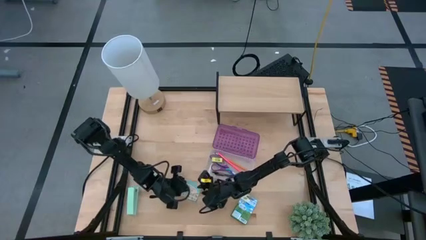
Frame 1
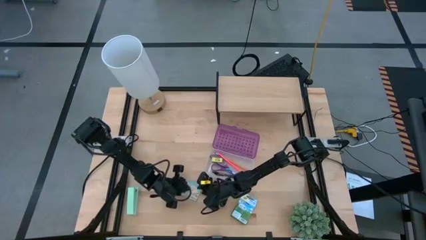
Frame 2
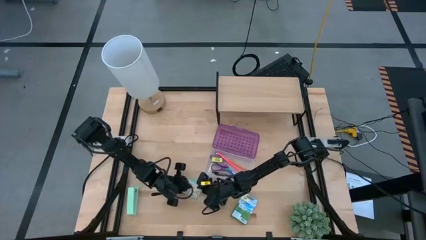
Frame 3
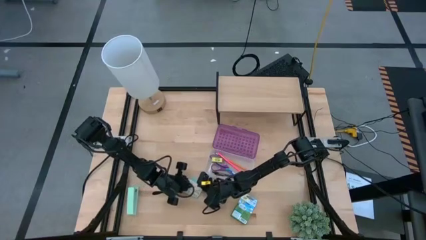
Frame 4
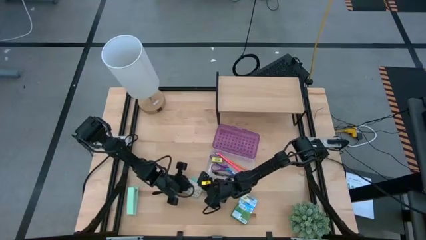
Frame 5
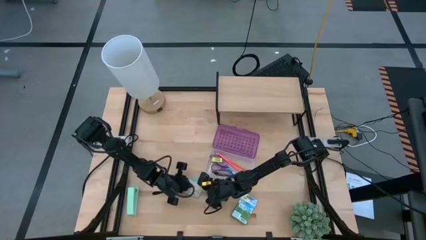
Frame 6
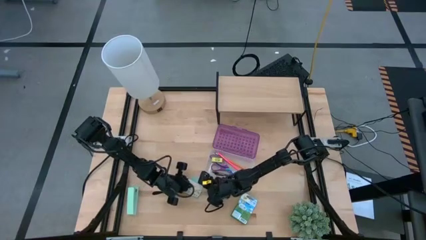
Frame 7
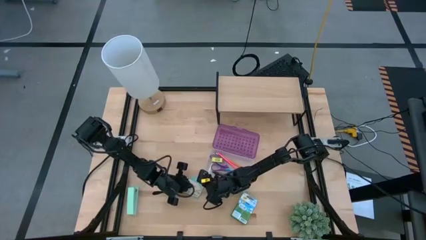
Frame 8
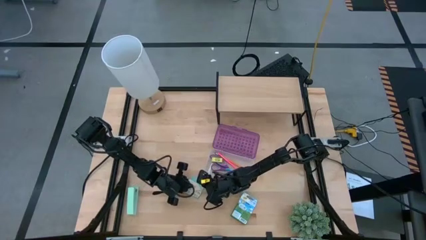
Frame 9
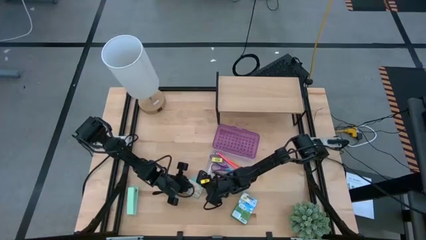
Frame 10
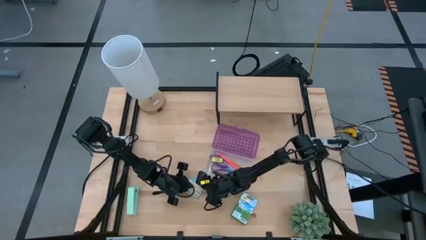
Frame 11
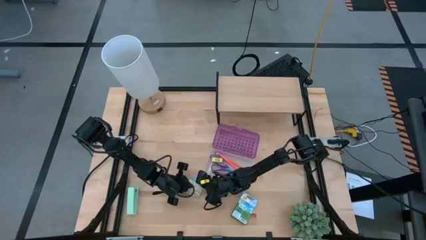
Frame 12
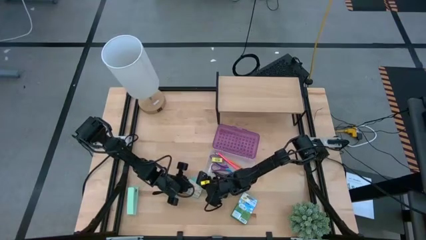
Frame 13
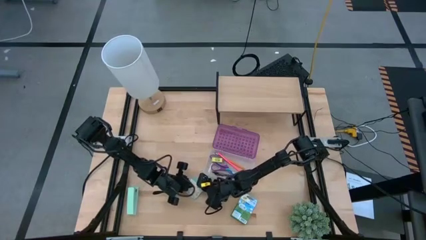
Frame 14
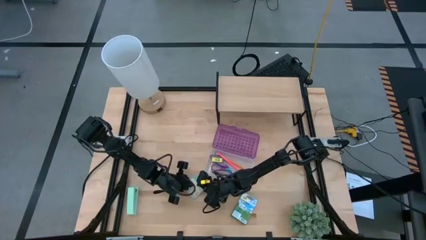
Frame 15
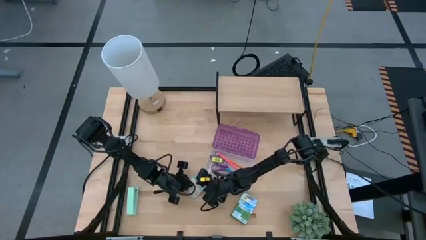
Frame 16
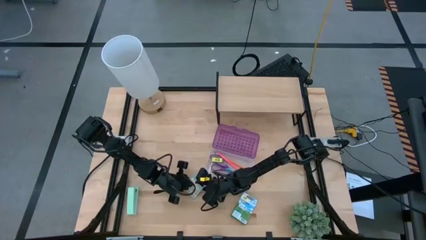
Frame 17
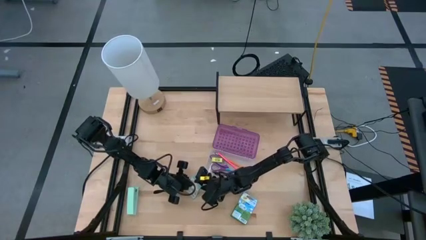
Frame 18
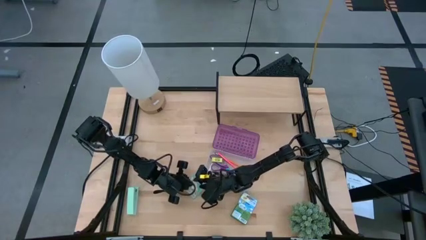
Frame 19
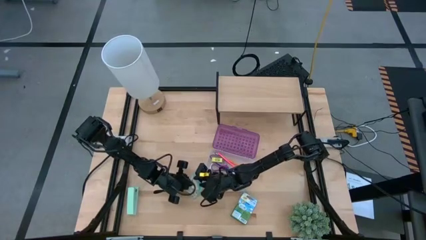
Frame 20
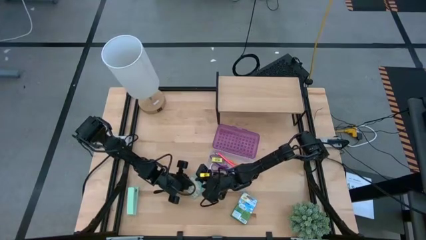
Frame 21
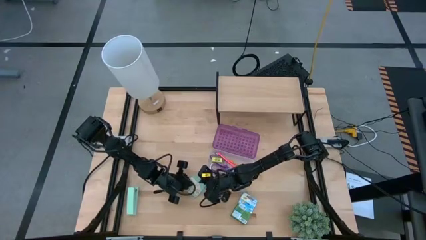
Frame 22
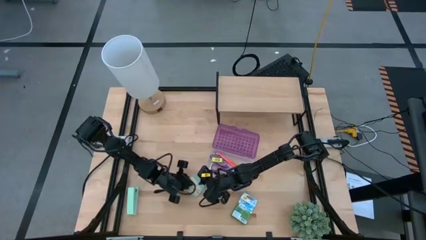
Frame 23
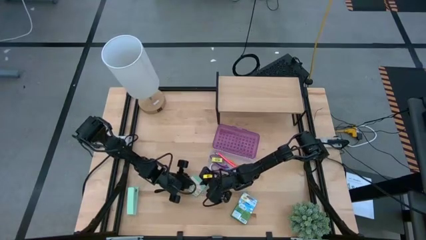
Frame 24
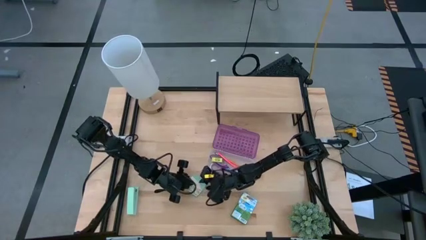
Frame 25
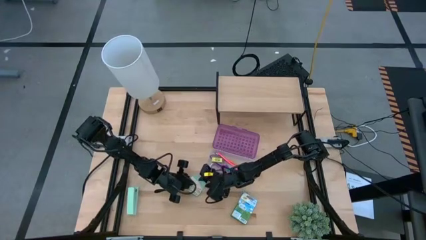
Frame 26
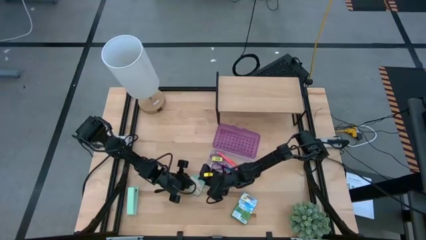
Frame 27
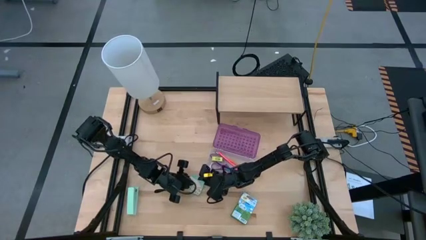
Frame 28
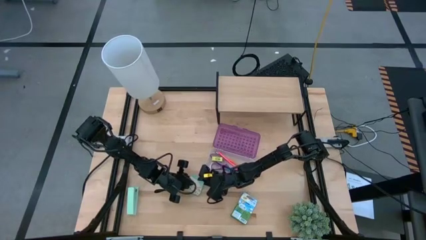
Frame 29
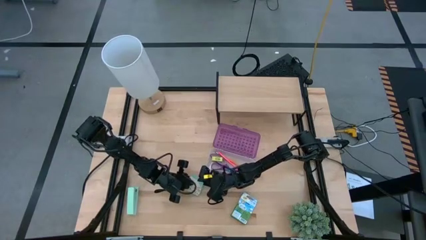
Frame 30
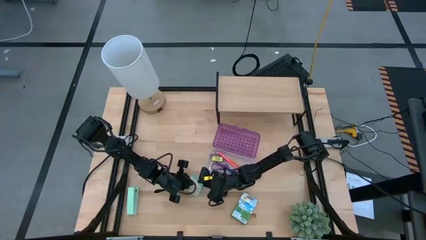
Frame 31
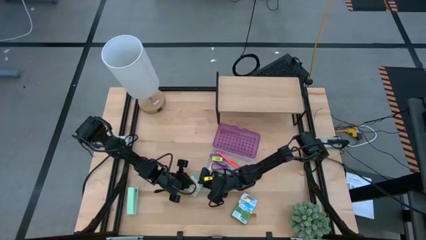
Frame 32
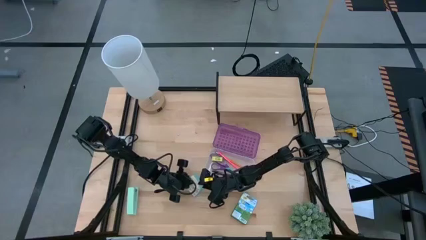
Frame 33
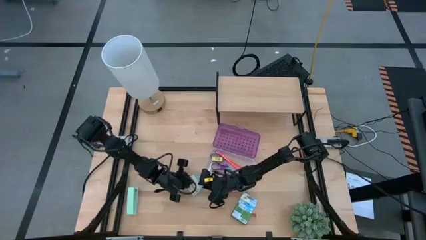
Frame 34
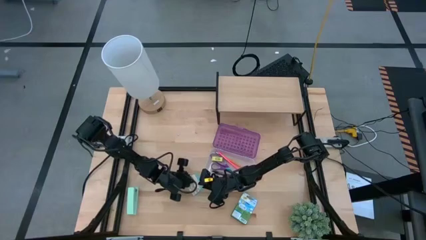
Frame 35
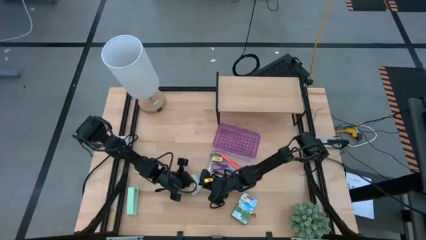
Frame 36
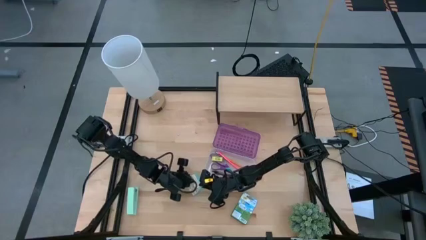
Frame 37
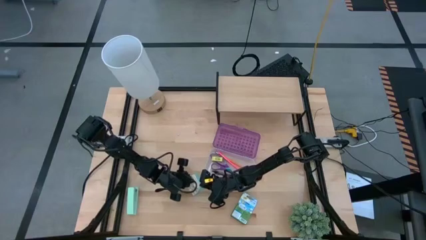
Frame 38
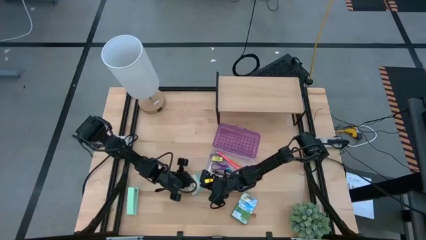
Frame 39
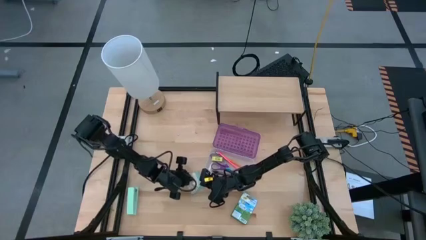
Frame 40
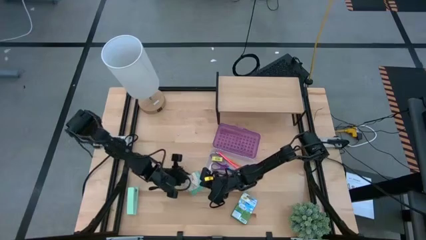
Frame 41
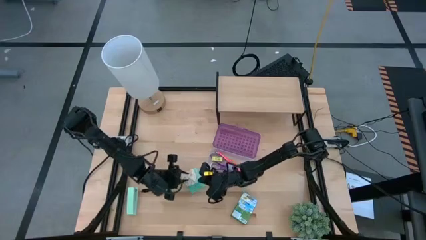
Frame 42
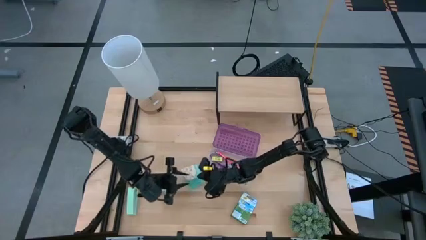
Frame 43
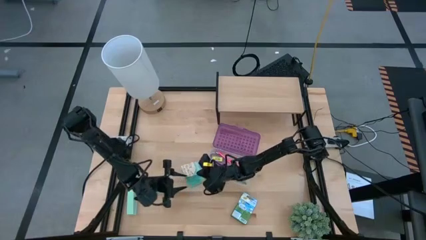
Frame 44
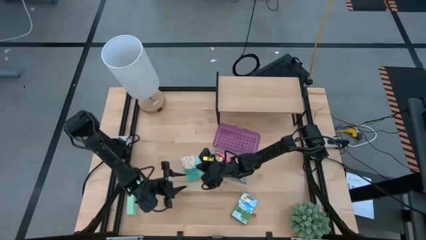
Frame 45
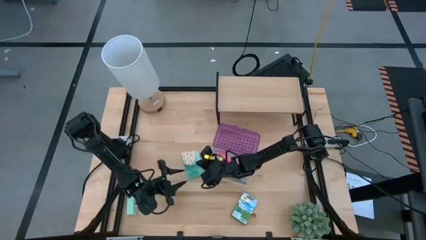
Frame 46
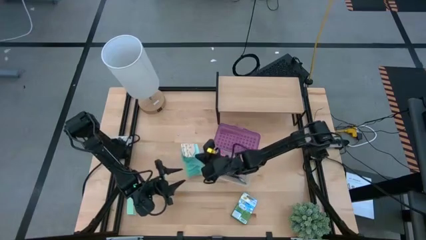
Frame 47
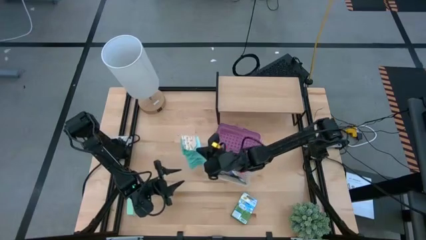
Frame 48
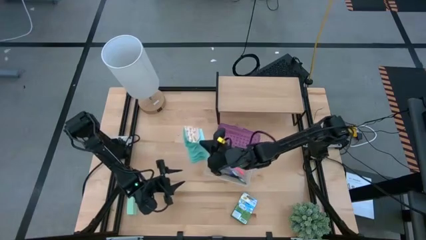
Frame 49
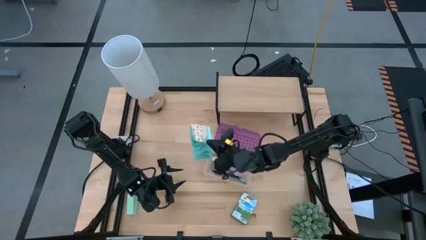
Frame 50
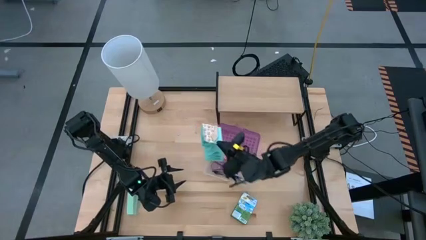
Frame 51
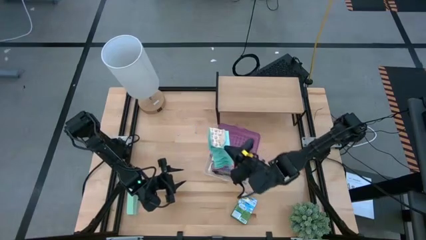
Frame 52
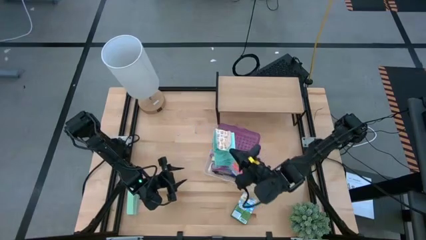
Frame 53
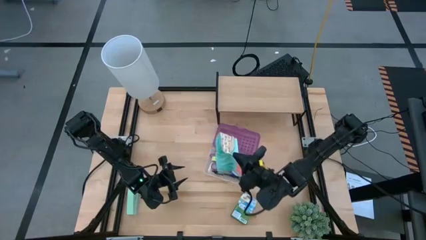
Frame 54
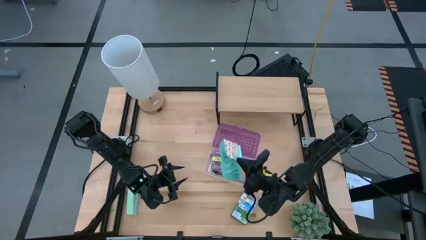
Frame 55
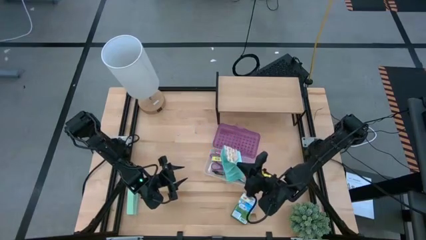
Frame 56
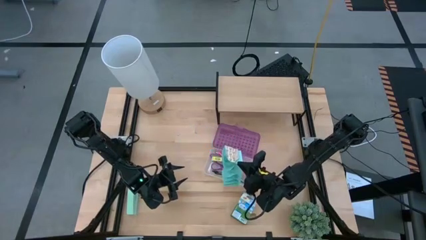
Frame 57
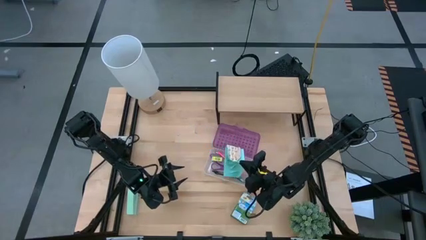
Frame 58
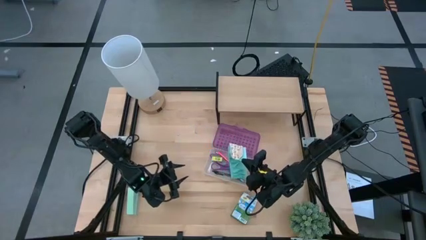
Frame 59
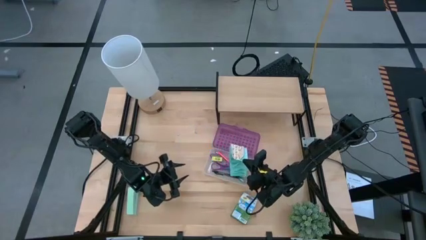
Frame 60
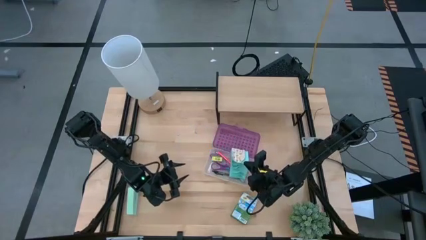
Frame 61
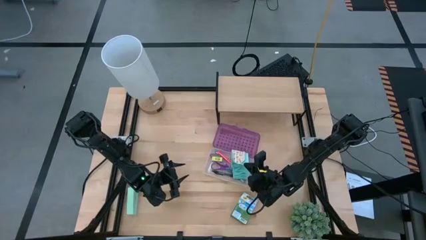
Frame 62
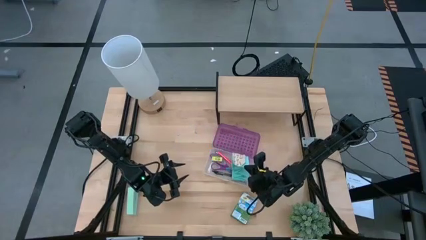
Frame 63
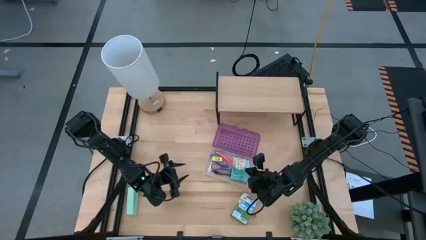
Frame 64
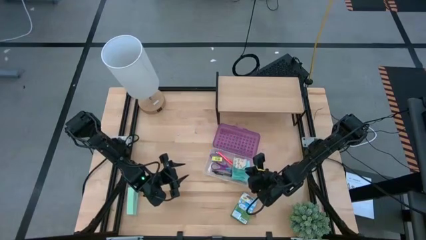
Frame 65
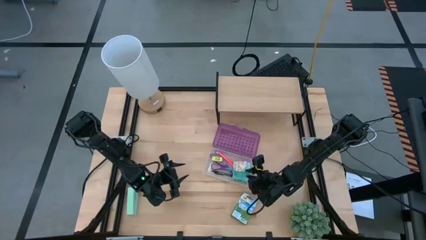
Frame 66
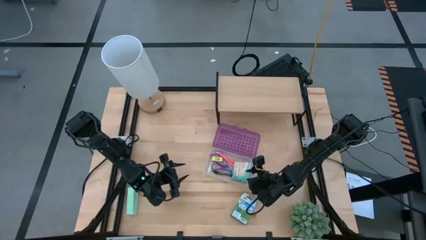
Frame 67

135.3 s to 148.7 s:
Task: Pack school essentials
Put the blue sticky notes into the purple supply box

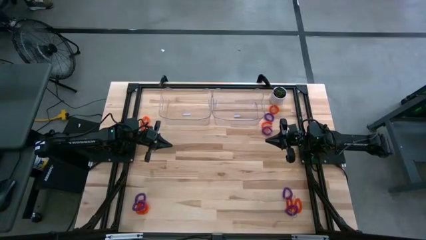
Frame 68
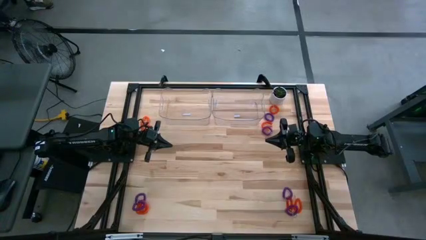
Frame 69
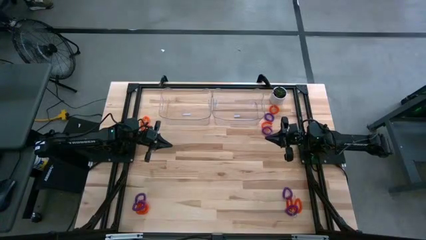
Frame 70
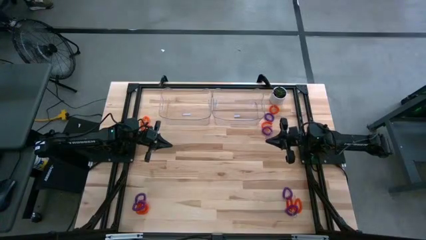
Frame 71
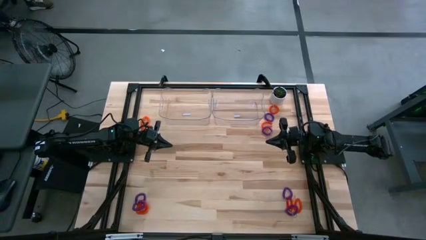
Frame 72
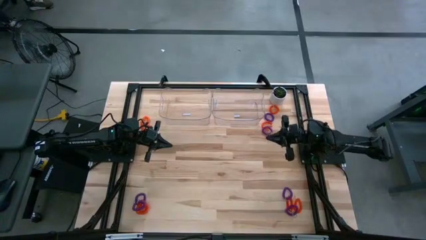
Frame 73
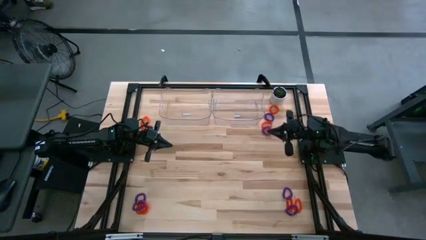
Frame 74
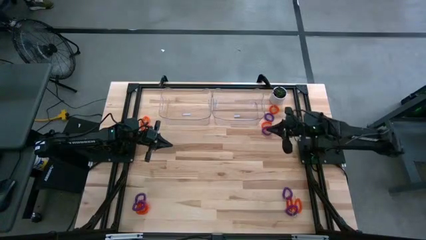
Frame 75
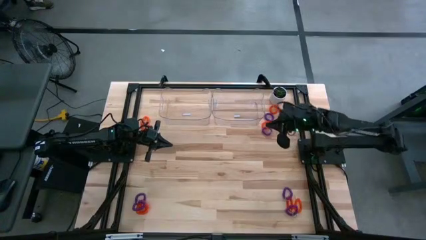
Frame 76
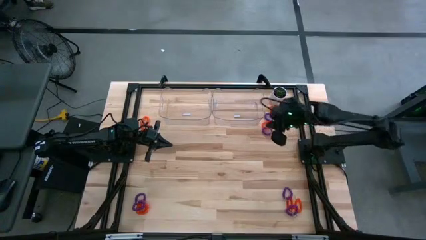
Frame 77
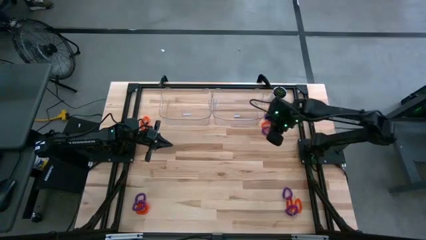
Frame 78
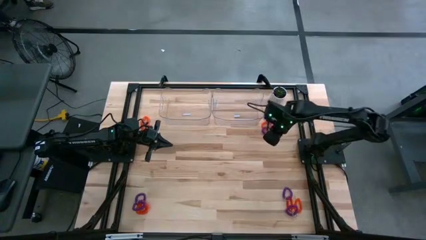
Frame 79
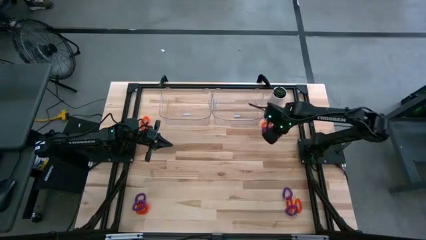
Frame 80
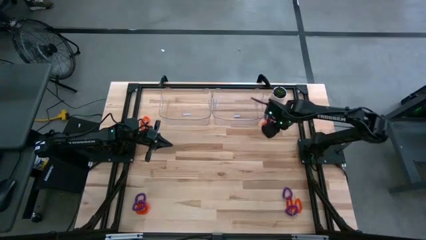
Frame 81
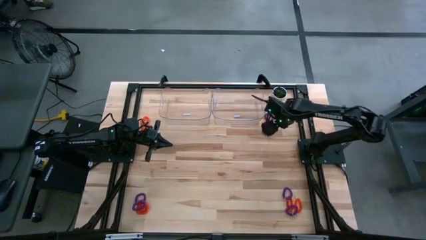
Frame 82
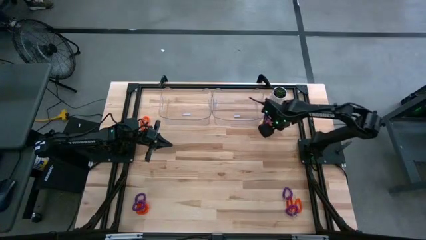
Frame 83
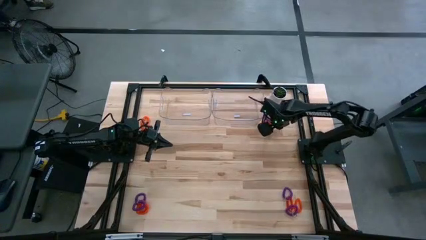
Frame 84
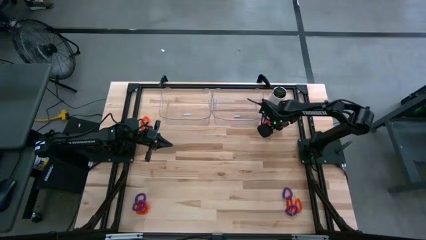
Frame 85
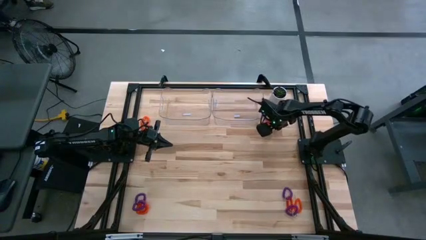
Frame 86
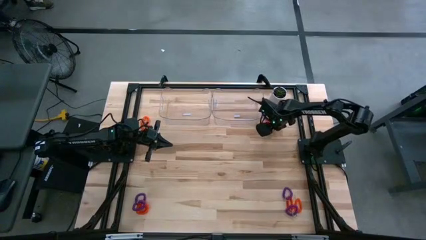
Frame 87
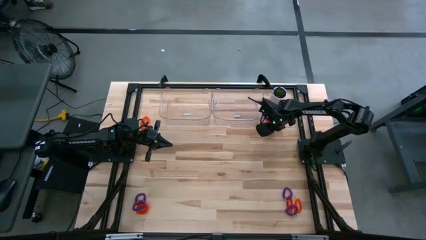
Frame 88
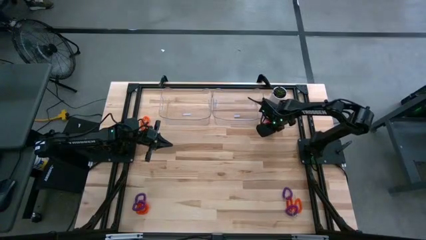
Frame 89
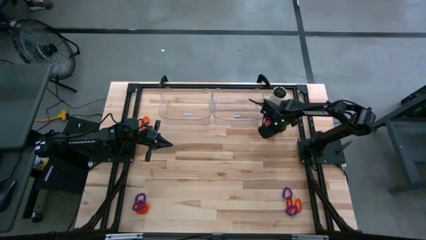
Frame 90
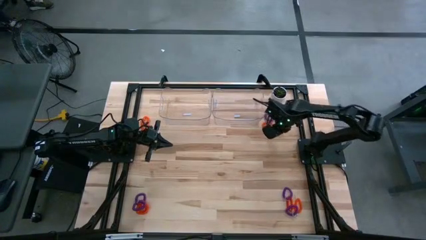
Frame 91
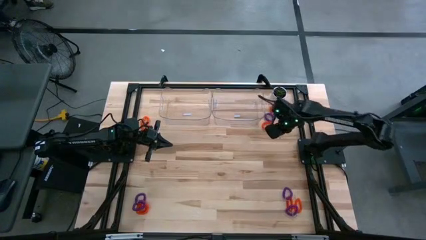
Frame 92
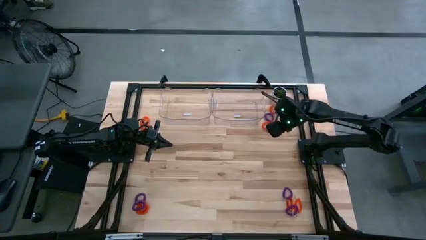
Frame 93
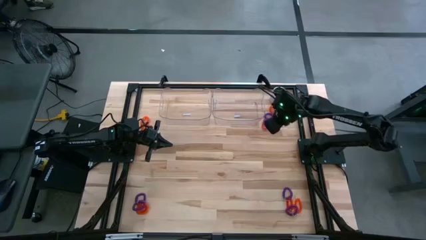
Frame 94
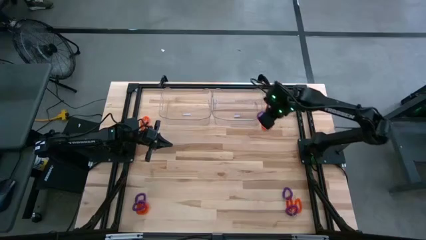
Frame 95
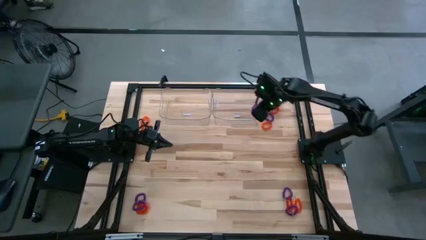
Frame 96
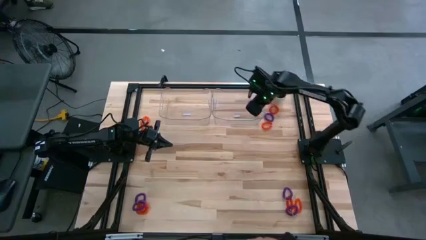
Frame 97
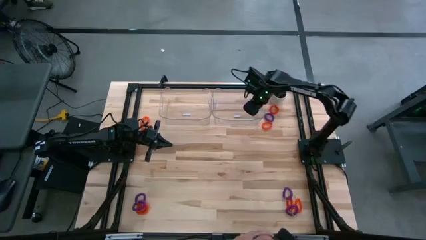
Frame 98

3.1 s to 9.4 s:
Task: Sort spring keychains
Put the violet spring keychain into the right transparent bin
